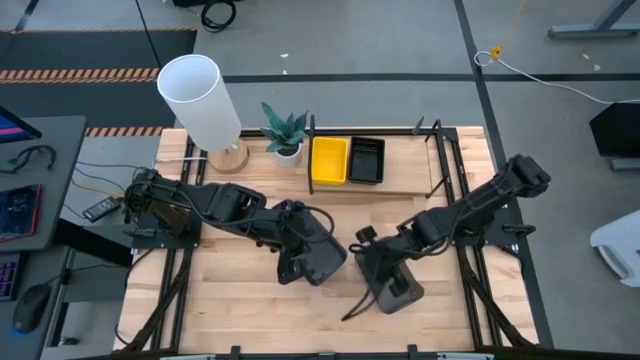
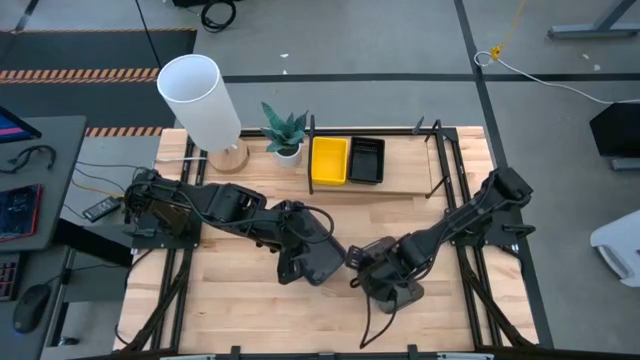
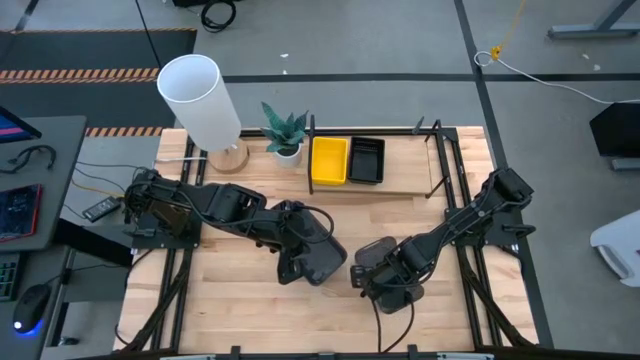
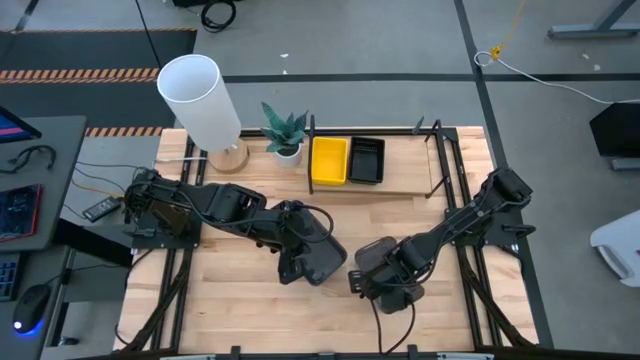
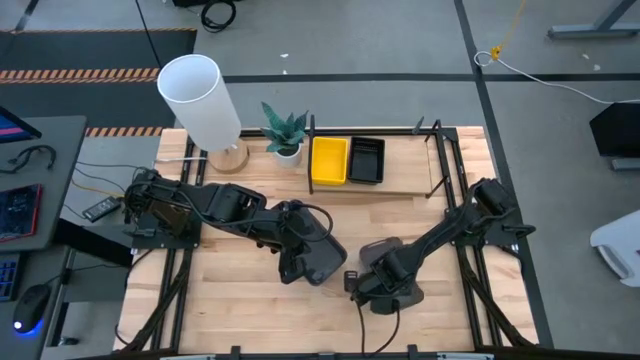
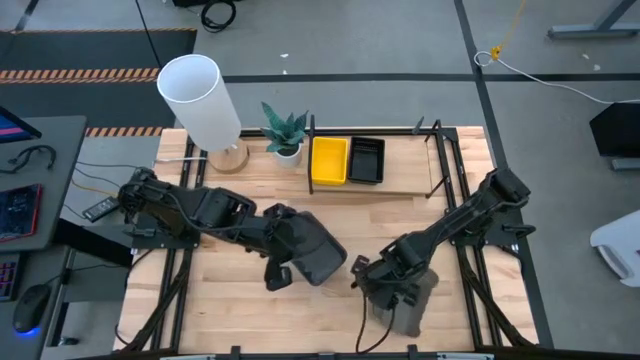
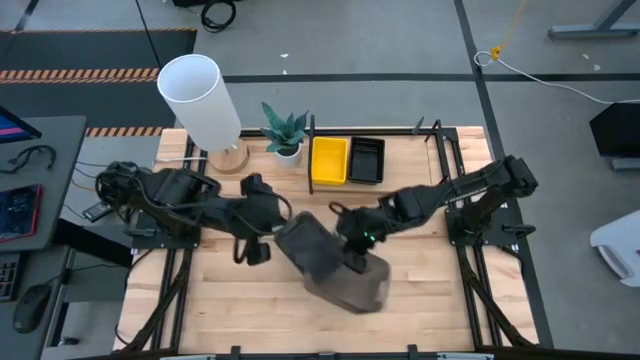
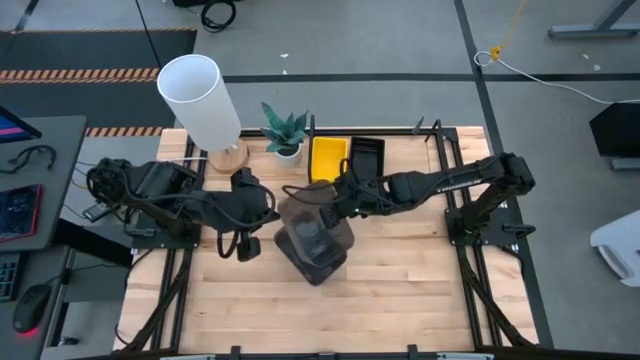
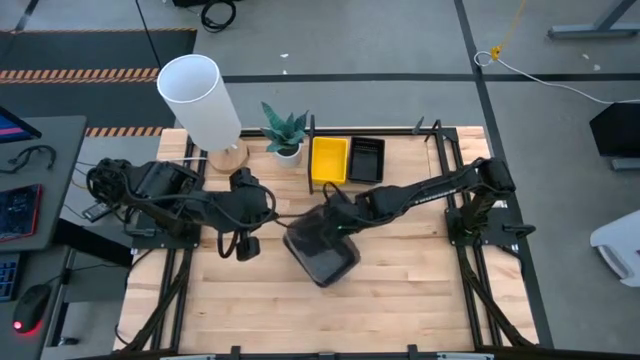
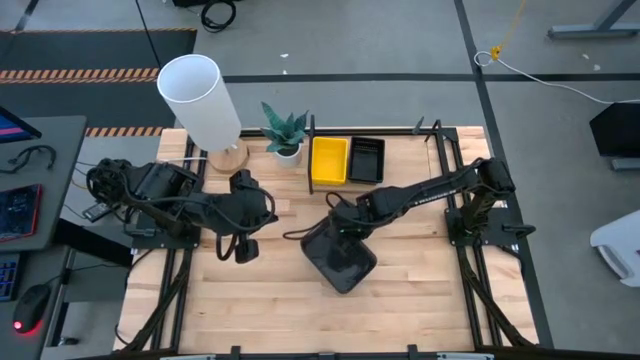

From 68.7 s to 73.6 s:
Task: Stack baskets on shelf by color
Stack the right transparent black bin into the left black bin

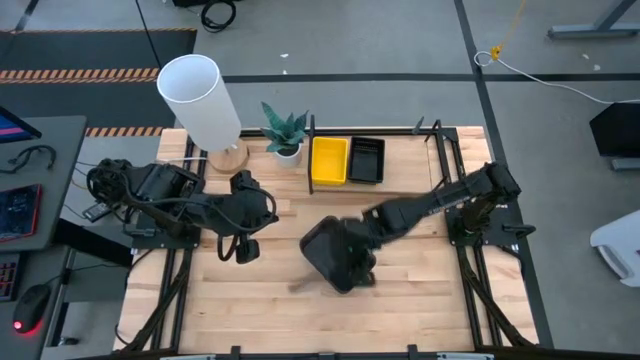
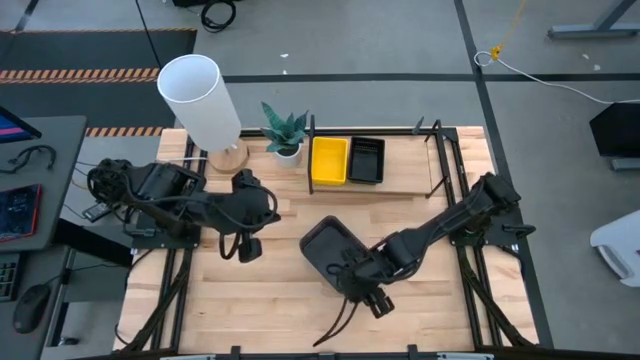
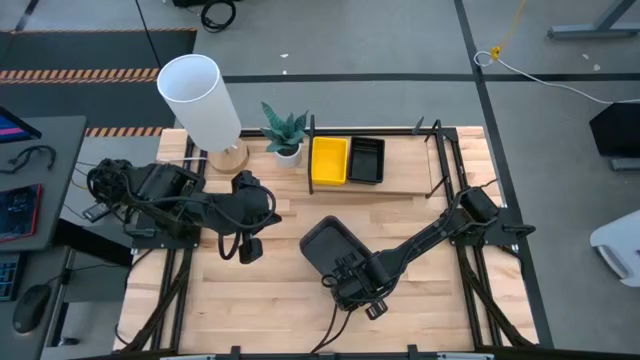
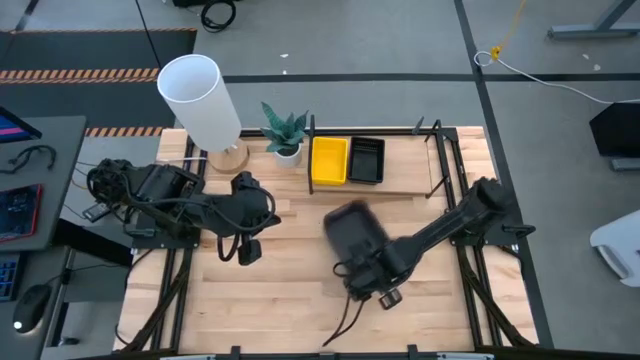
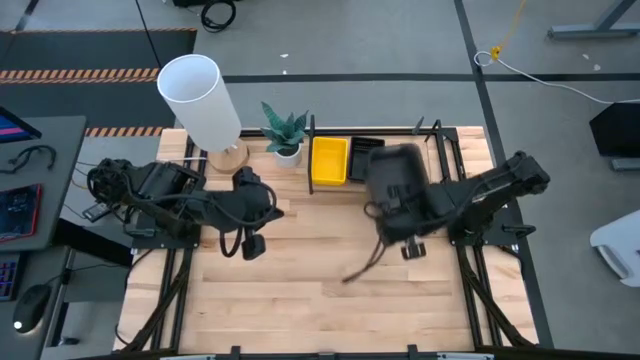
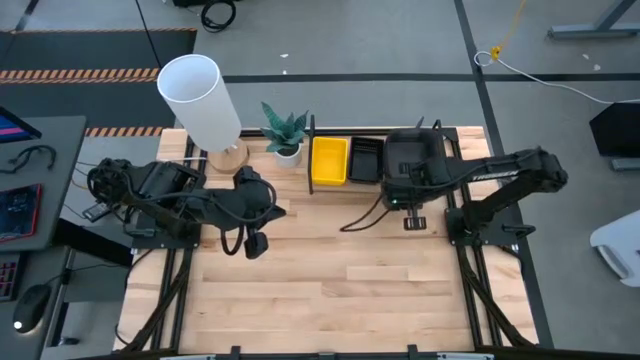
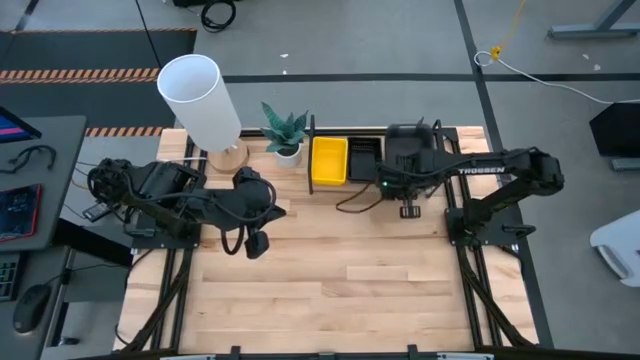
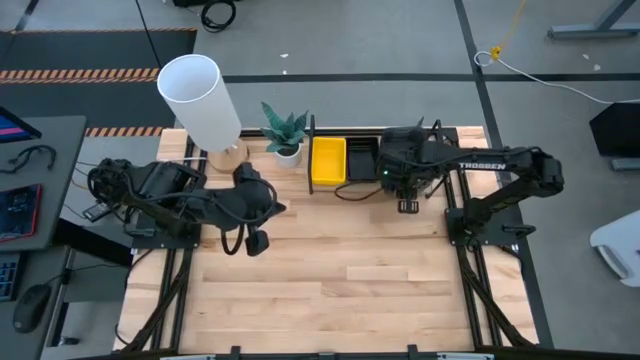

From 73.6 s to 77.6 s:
Put the stacked transparent black bins on the shelf

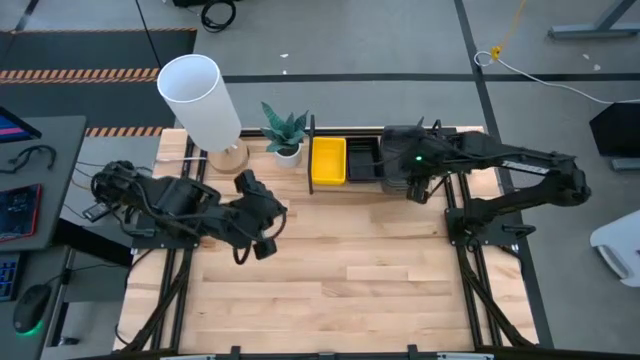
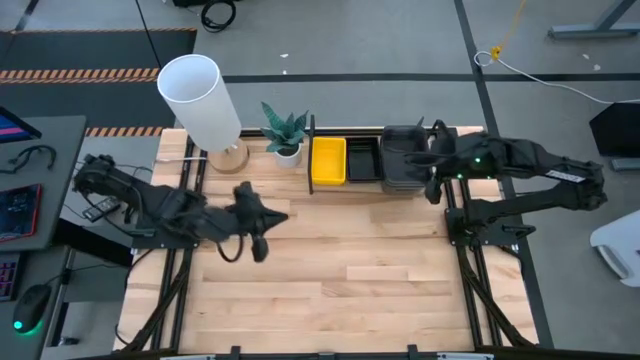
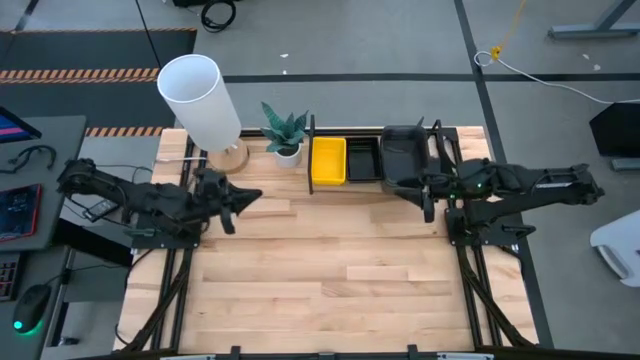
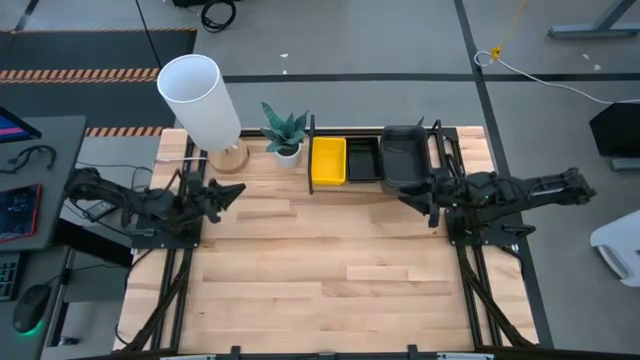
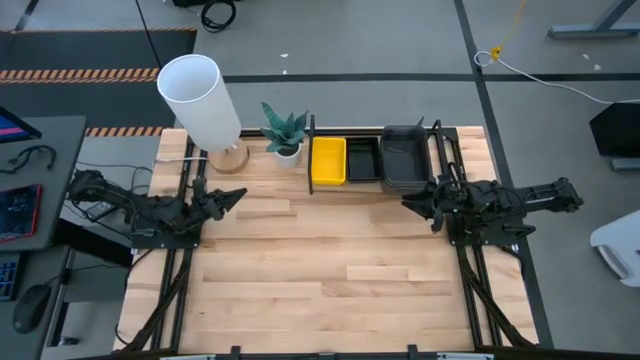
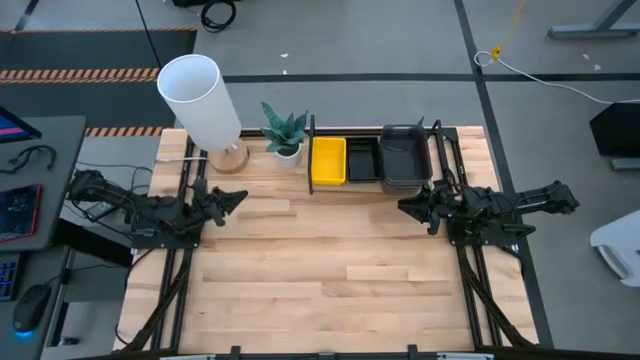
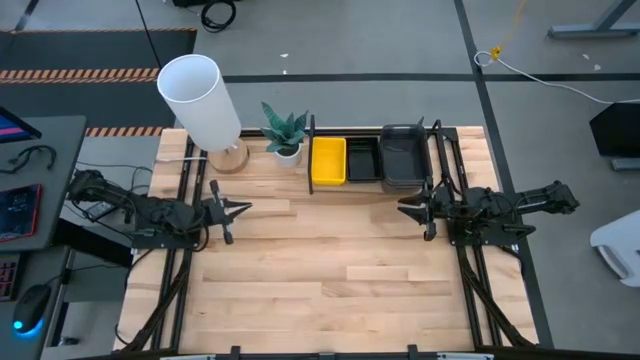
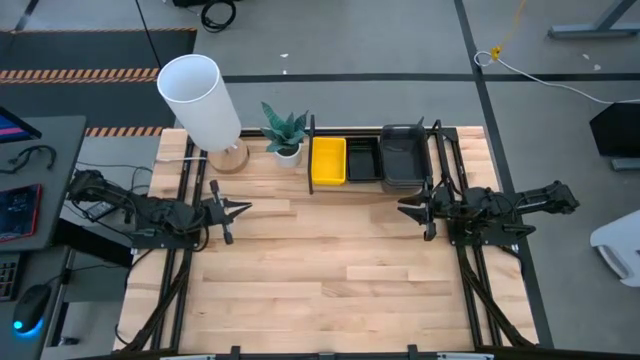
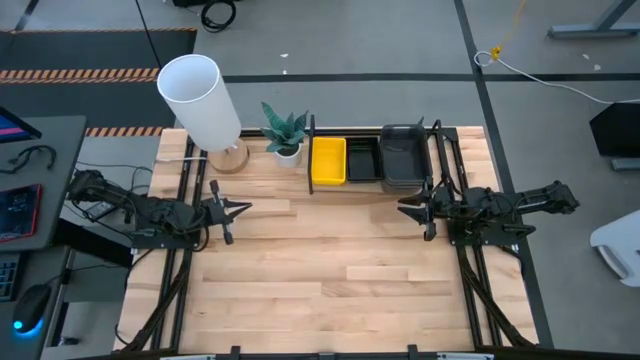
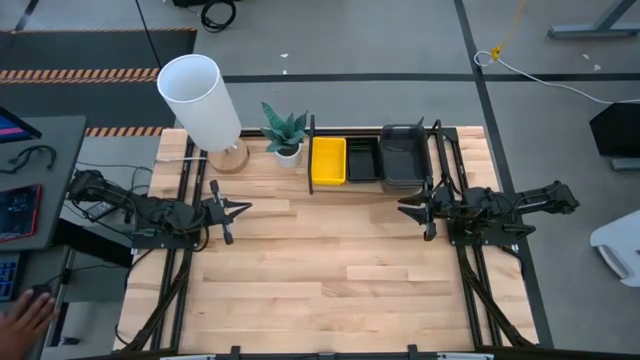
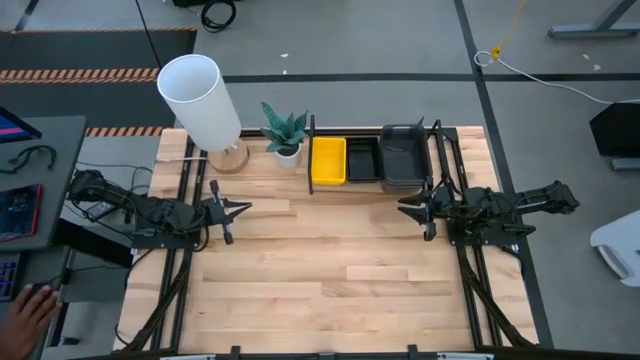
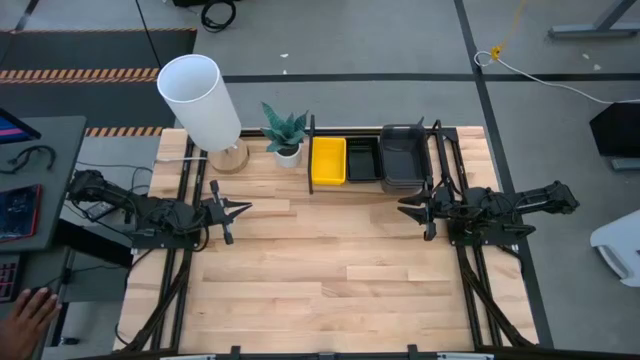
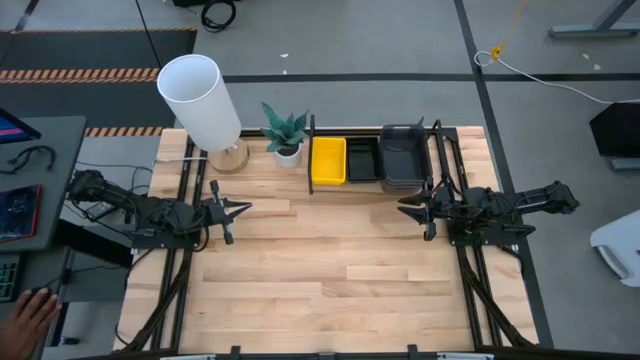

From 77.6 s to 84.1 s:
Return to Home Position

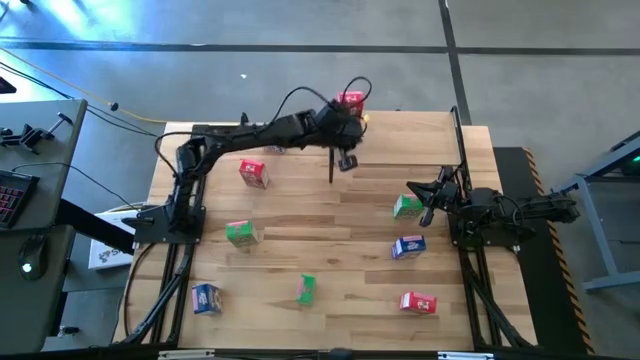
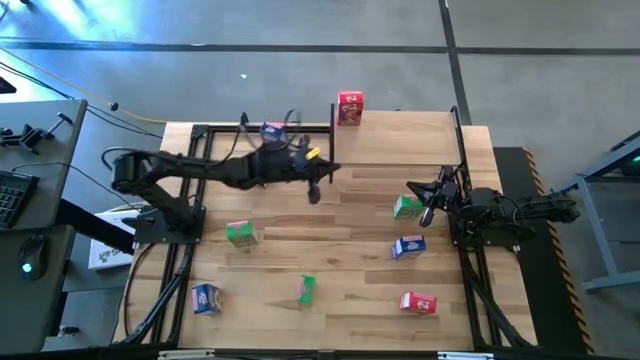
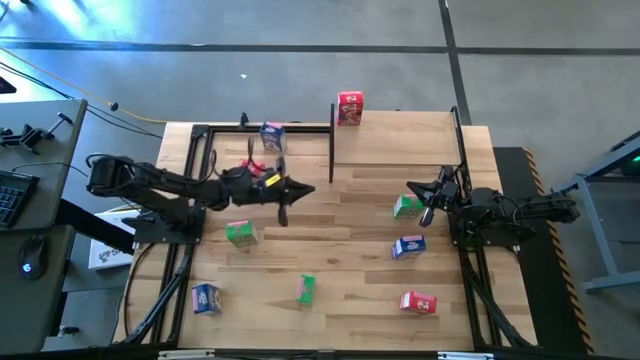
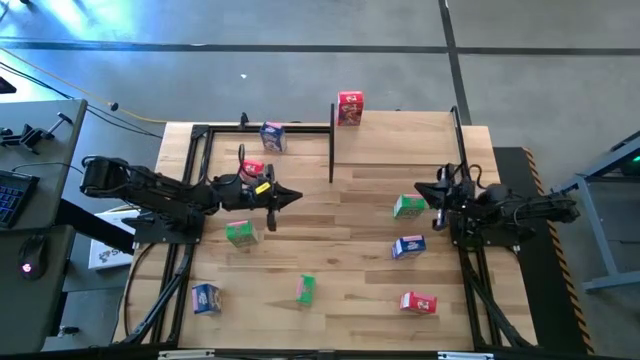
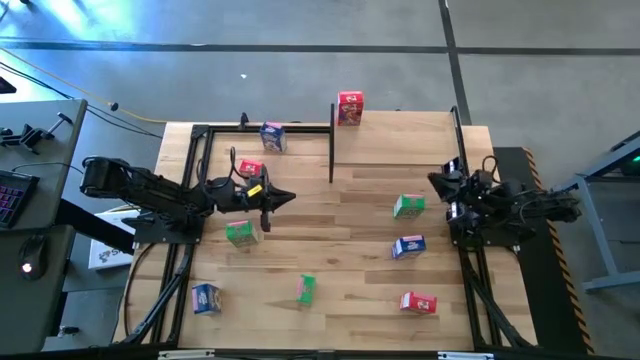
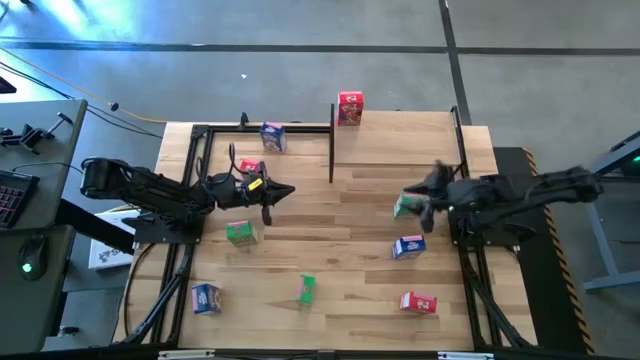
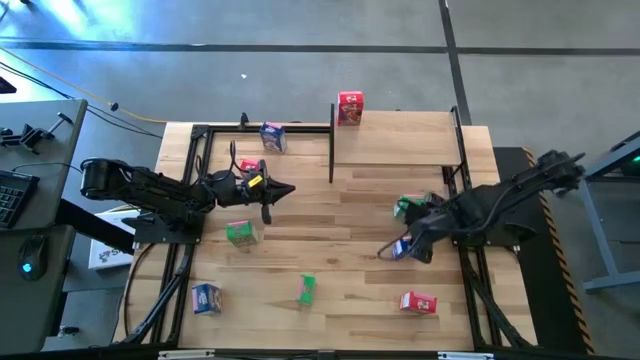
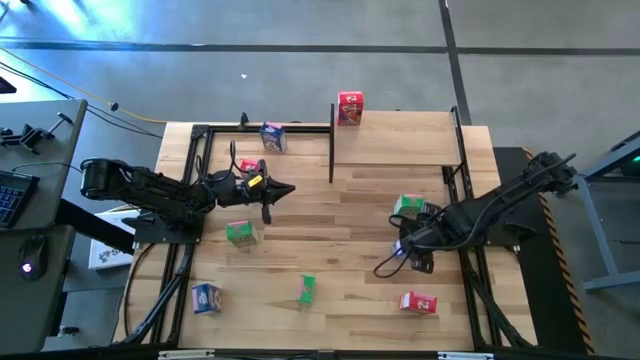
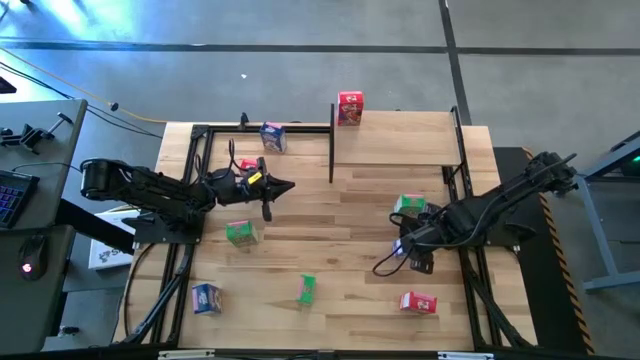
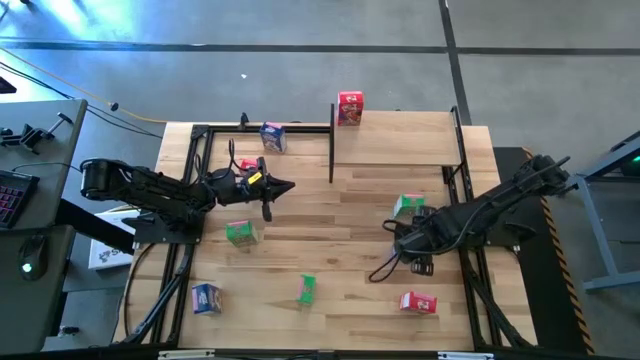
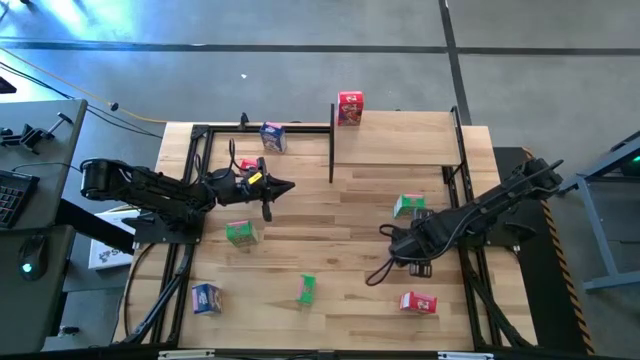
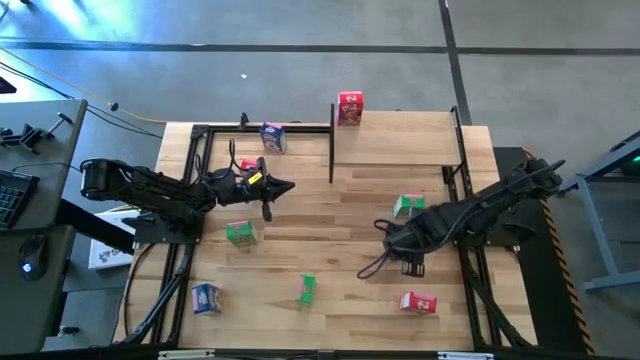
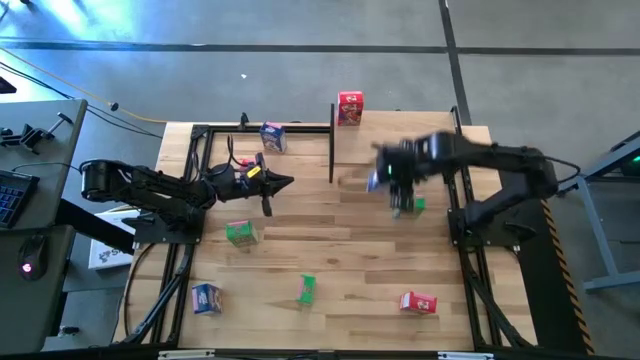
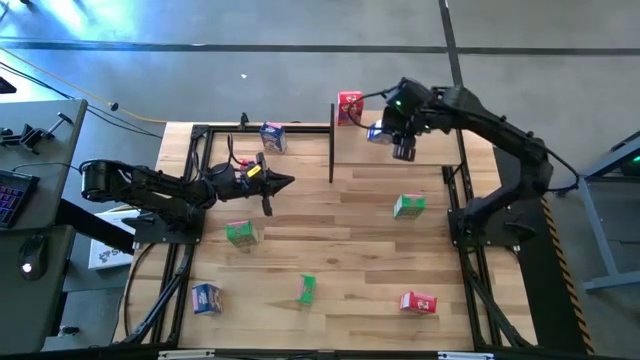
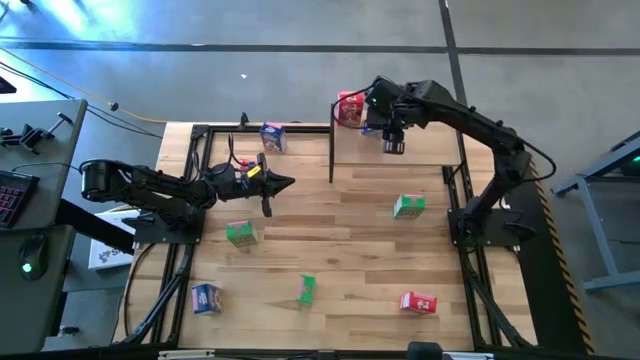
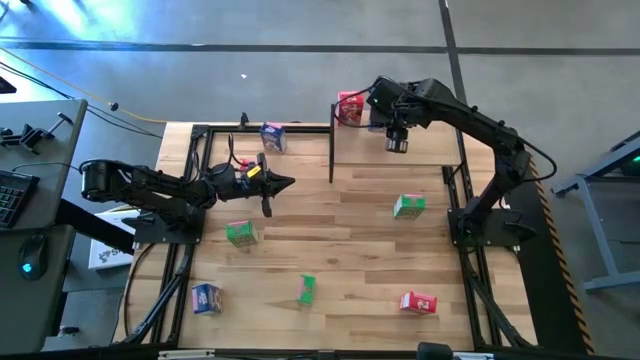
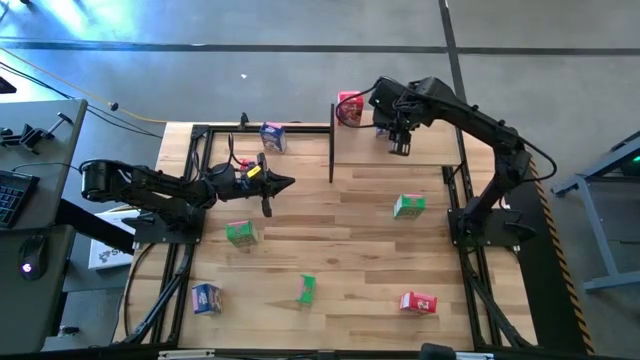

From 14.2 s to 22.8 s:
Task: Stack cereal on shelf
Put the bottom right blue cereal box on the shelf to the right of the red cereal box
